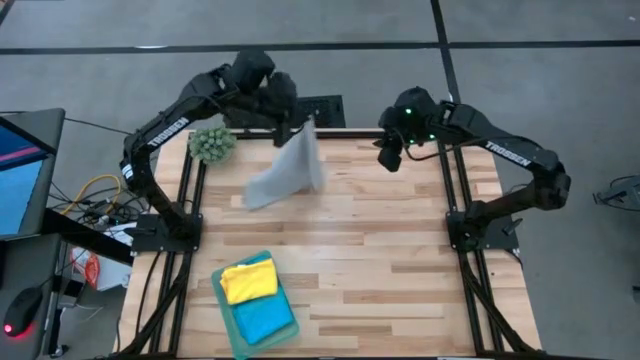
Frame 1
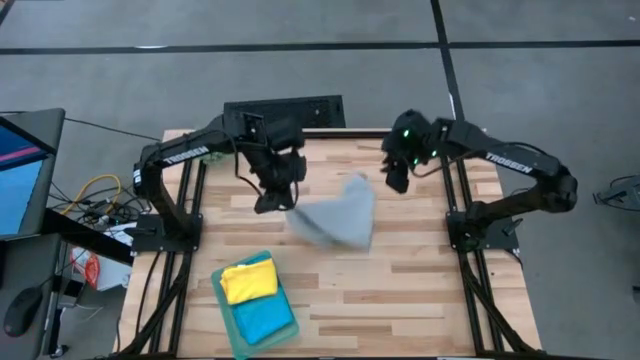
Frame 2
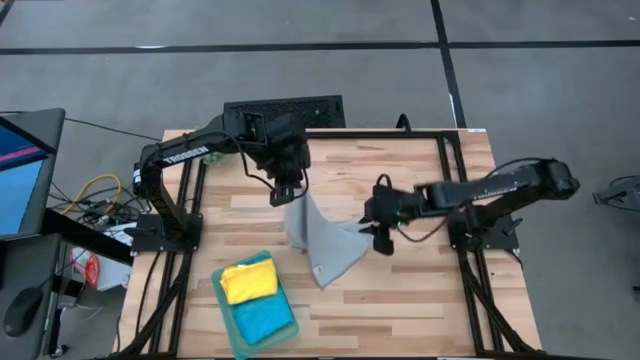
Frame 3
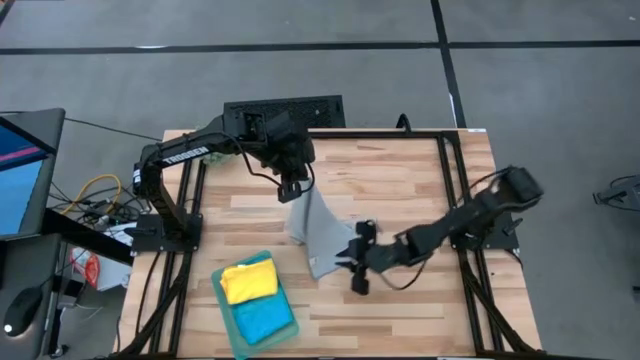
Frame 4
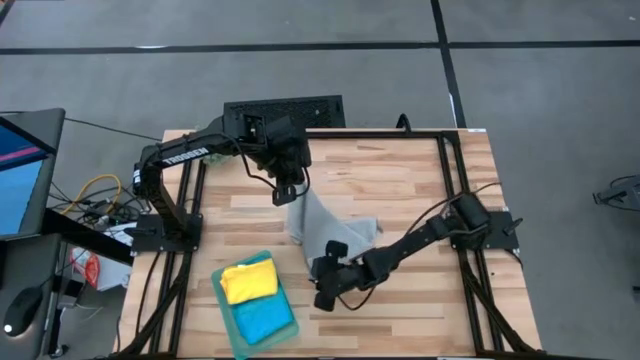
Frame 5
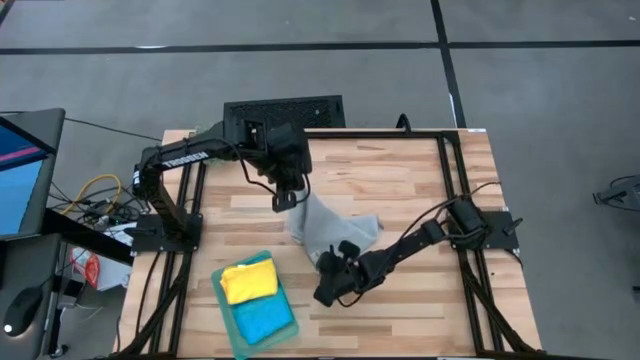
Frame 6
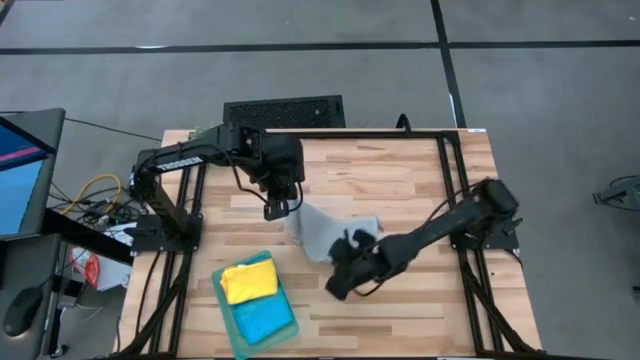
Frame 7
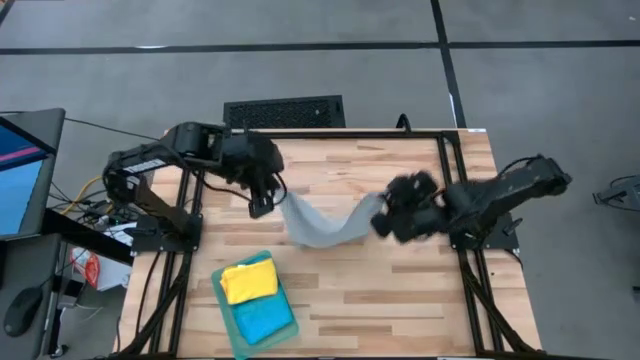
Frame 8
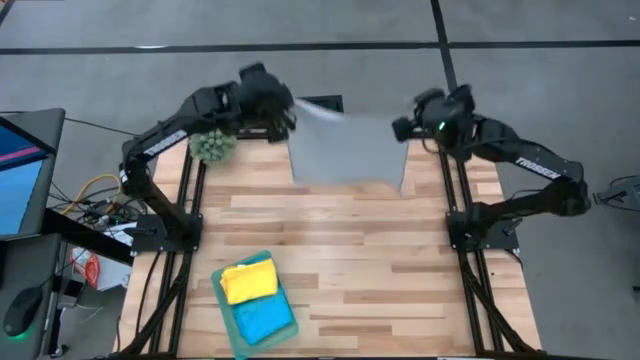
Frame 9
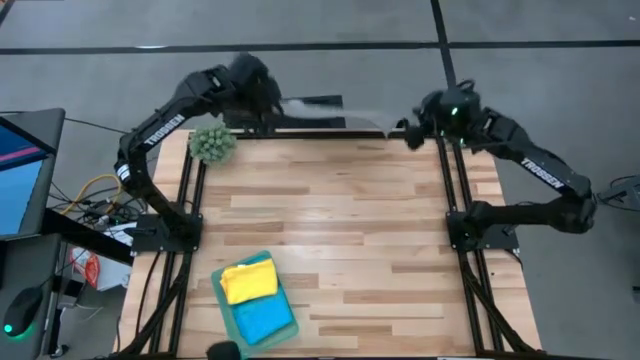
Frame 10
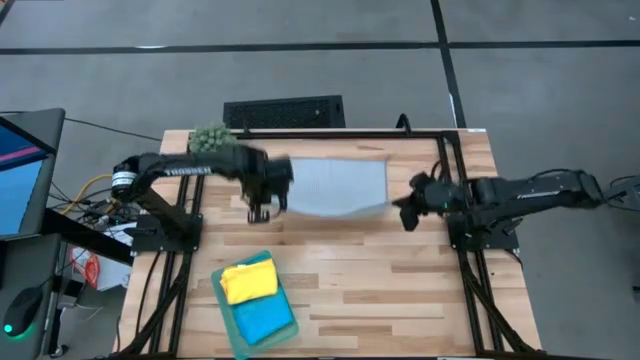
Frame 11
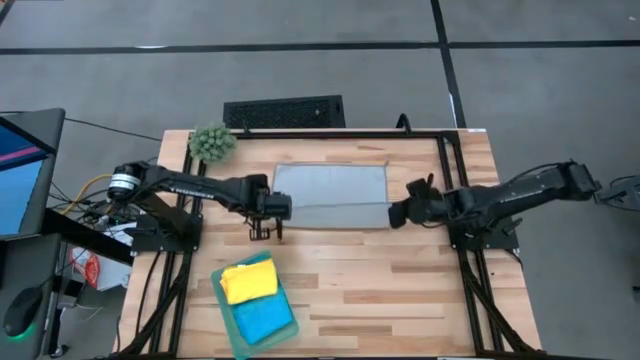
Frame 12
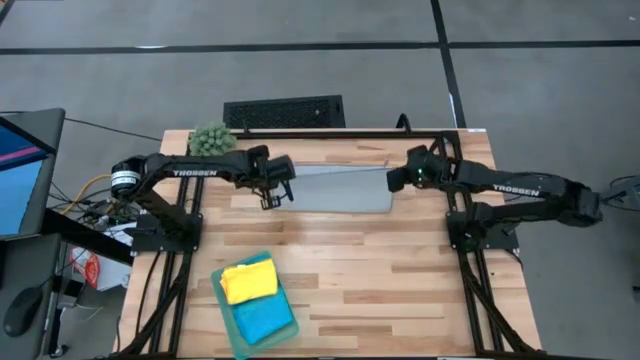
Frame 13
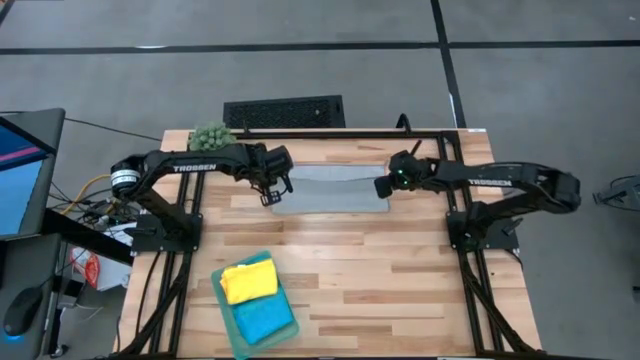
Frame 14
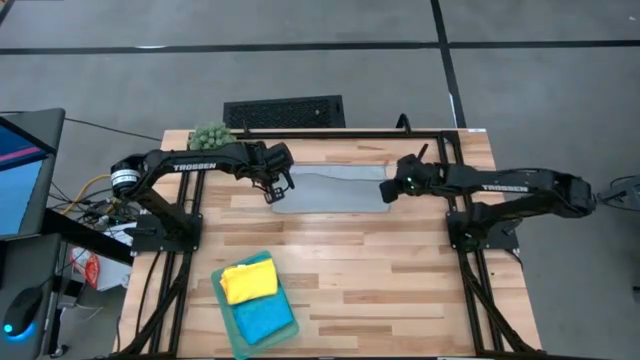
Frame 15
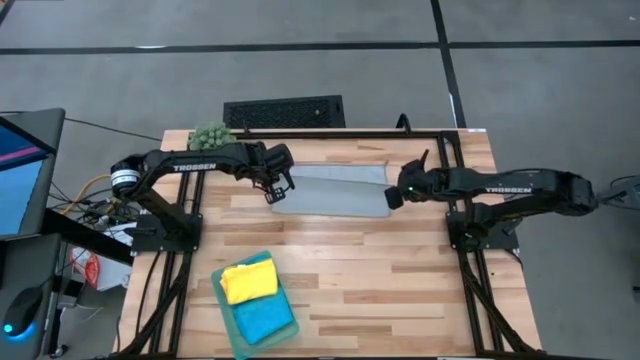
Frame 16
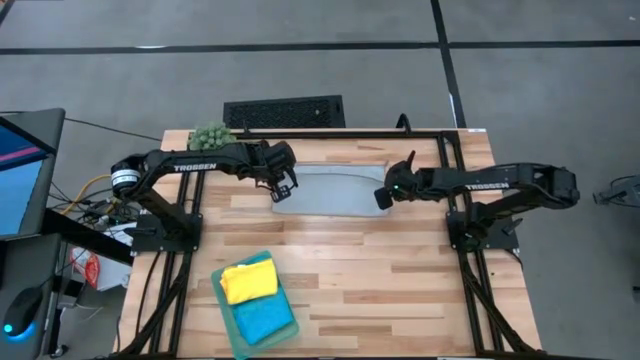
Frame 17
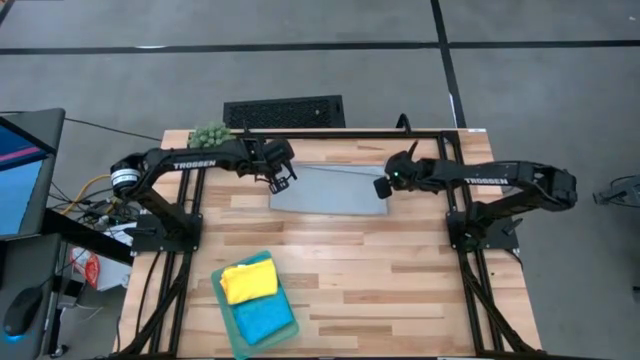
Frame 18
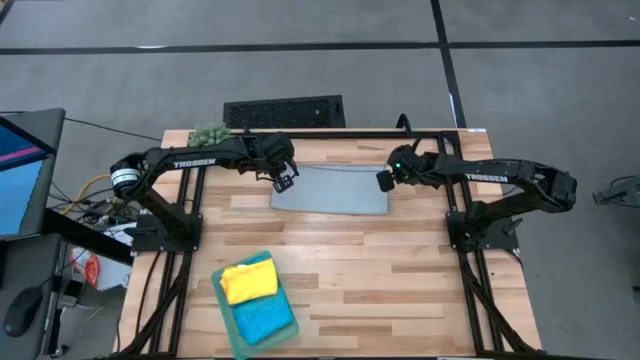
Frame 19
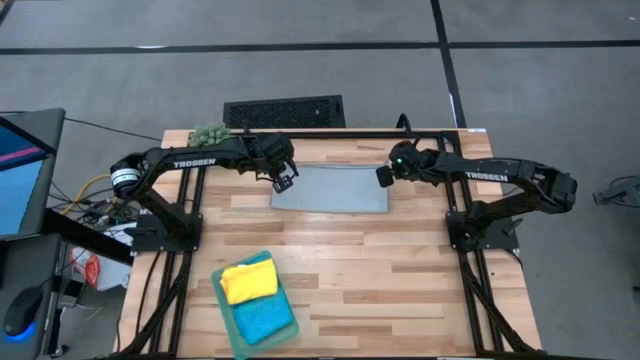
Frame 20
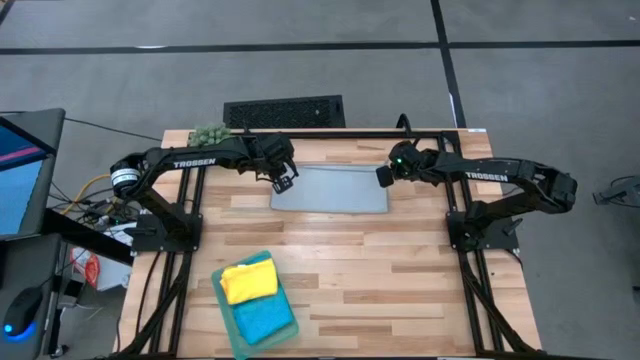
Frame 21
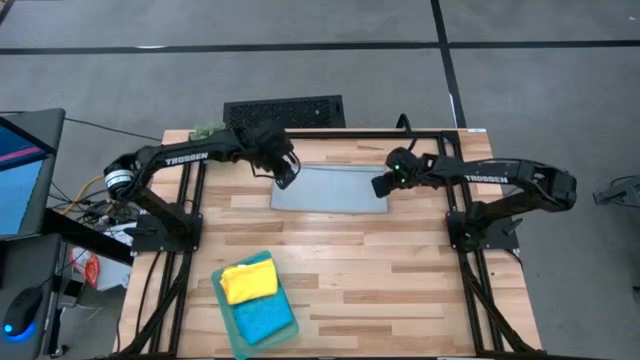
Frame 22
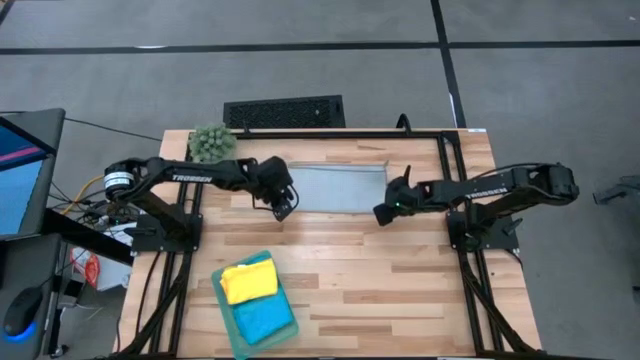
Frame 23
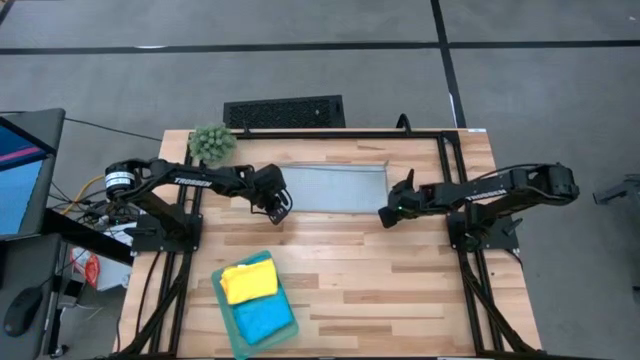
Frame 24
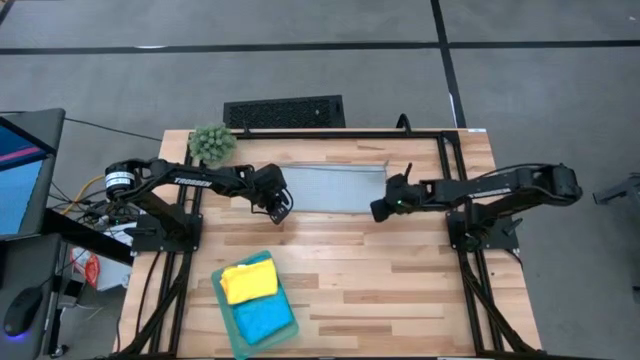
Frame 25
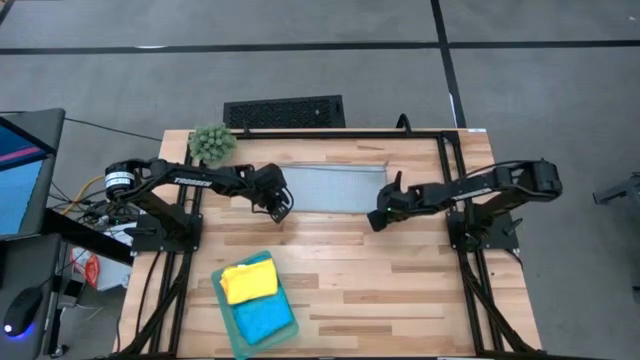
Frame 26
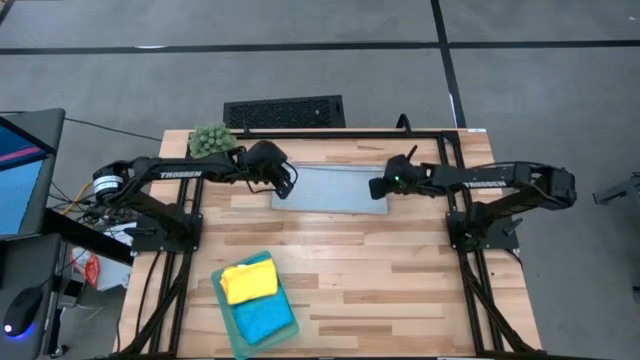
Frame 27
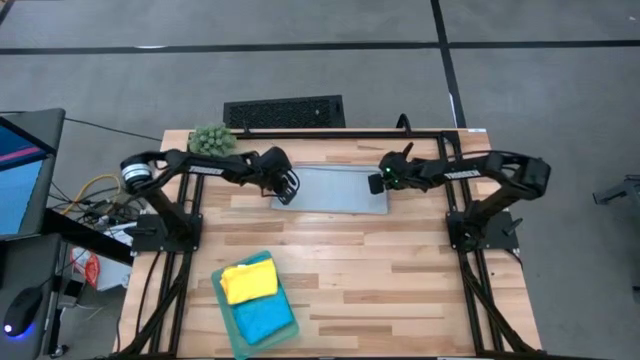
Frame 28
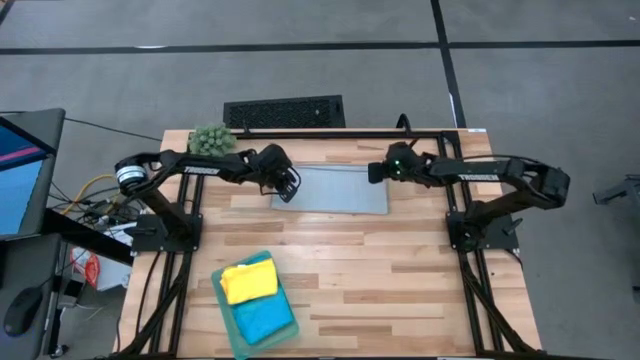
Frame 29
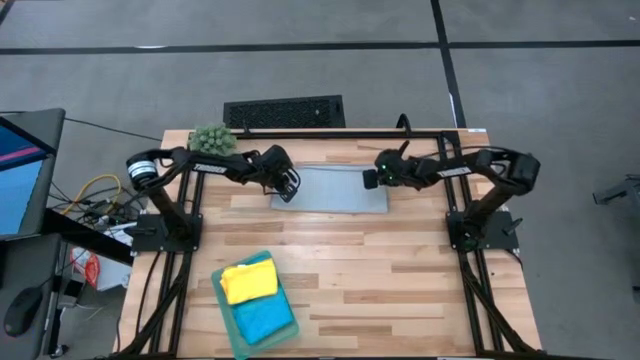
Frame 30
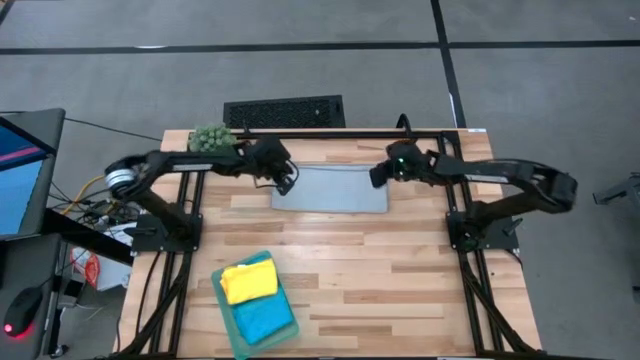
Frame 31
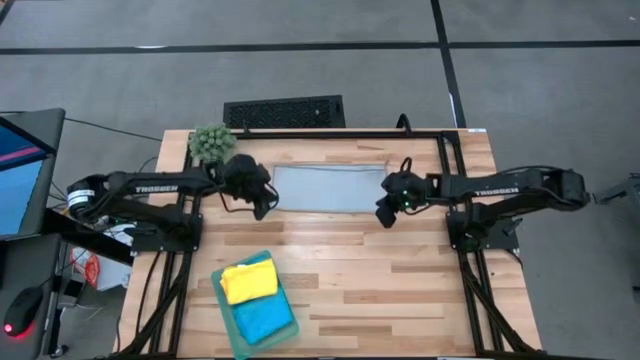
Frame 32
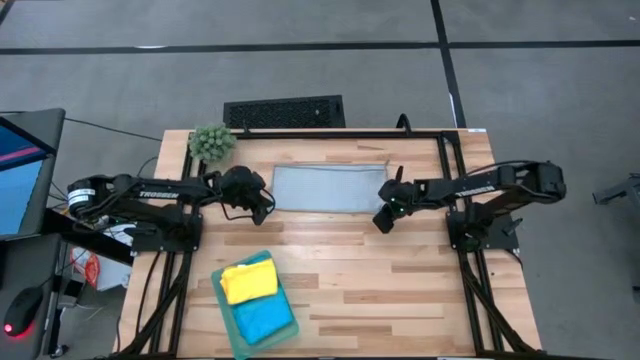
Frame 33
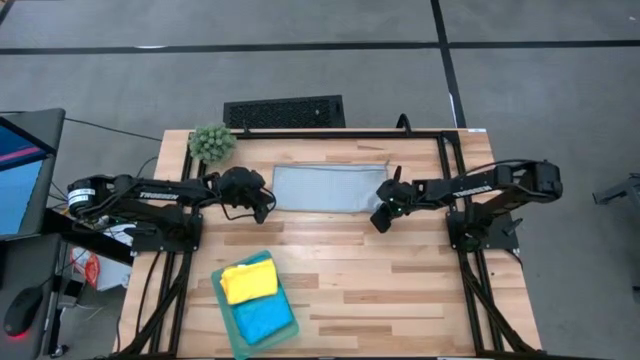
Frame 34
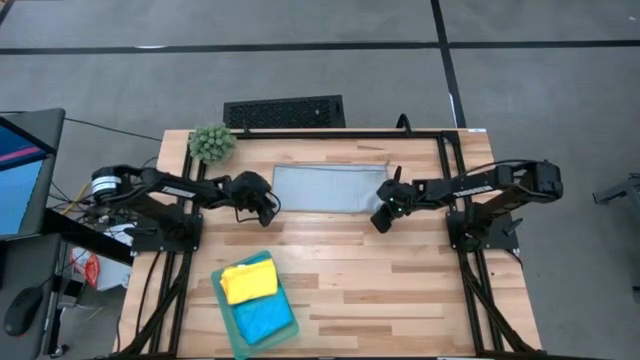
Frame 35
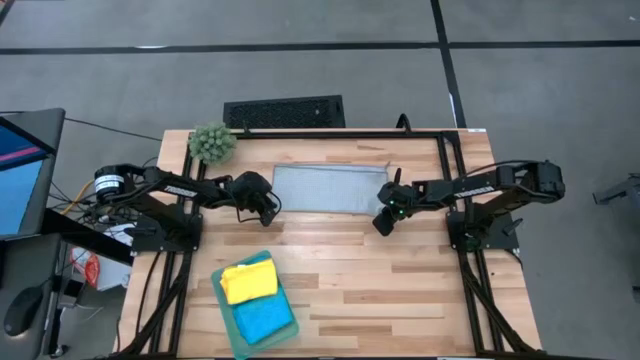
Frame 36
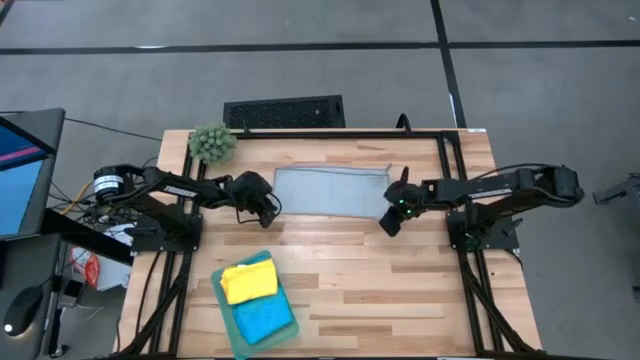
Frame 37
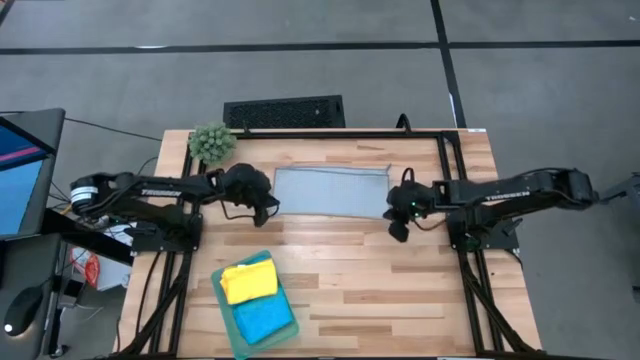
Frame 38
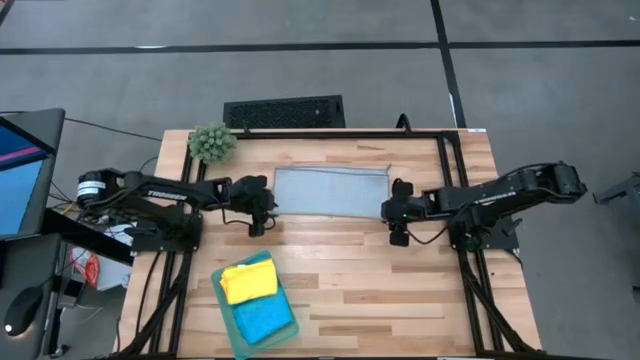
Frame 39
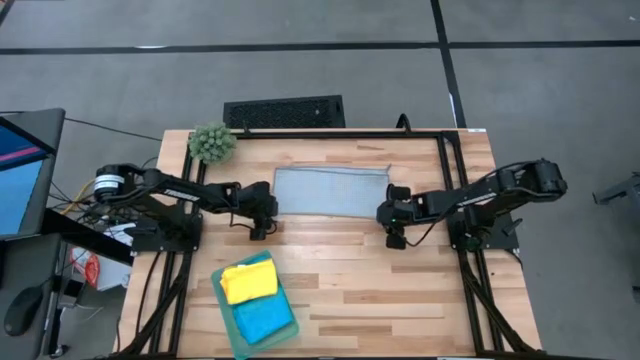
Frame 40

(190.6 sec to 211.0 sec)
Task: Fold microfiber towels
Fold the gray towel and put into the bin
